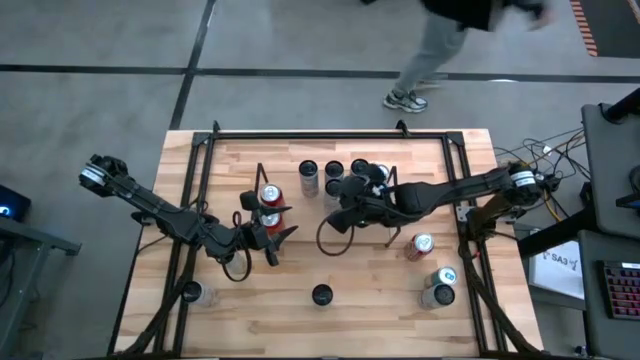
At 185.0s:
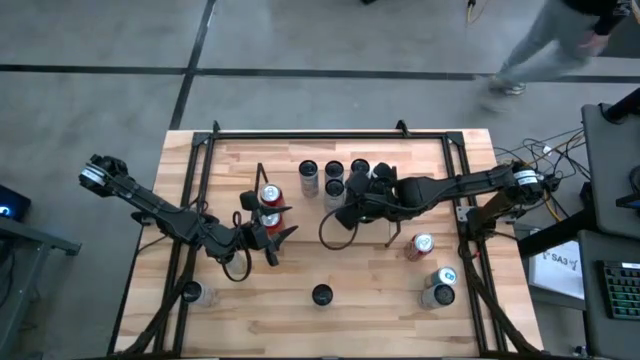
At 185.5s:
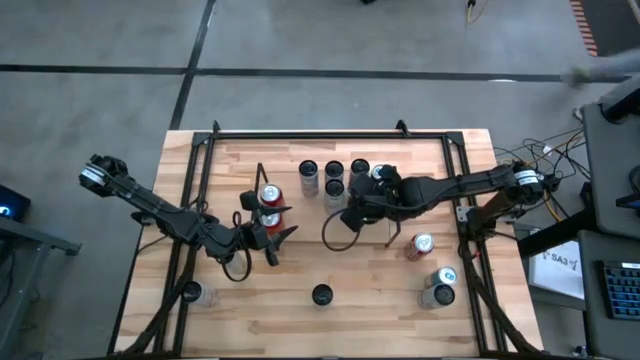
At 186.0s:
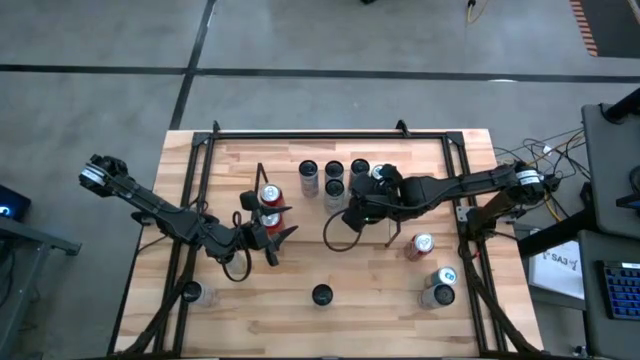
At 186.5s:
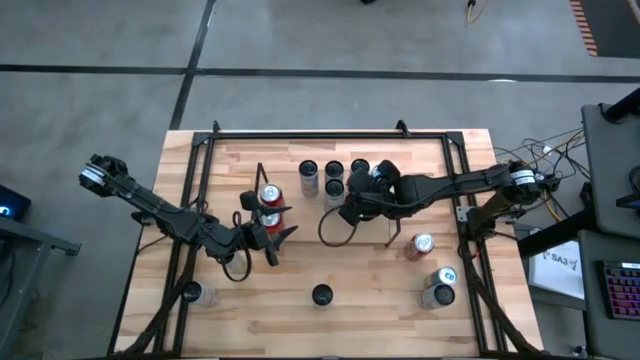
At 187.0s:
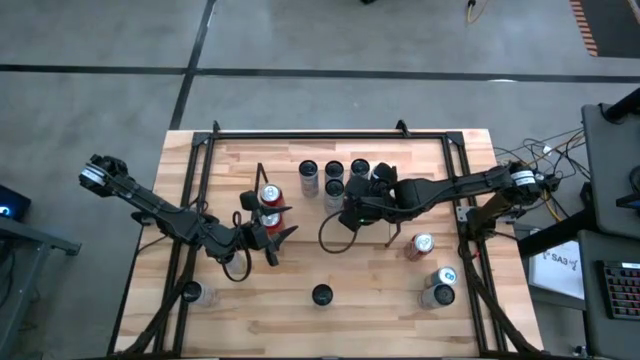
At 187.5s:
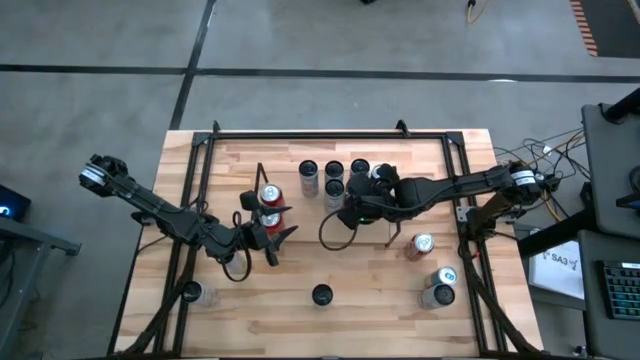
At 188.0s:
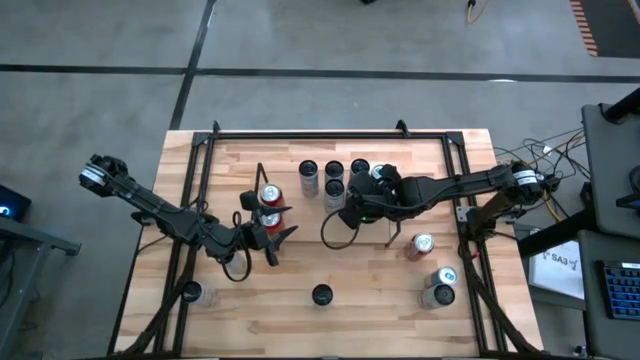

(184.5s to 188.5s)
Task: Place canned beverage on shelf
Adjust the white and yellow soda can

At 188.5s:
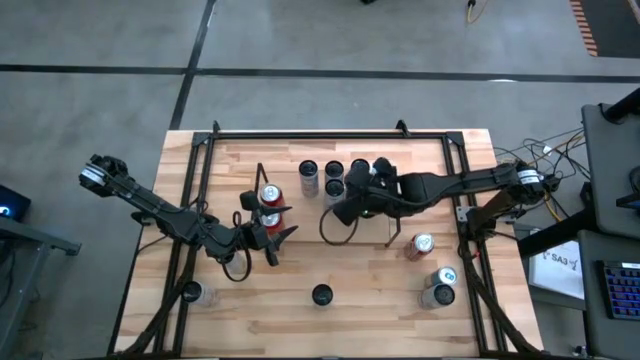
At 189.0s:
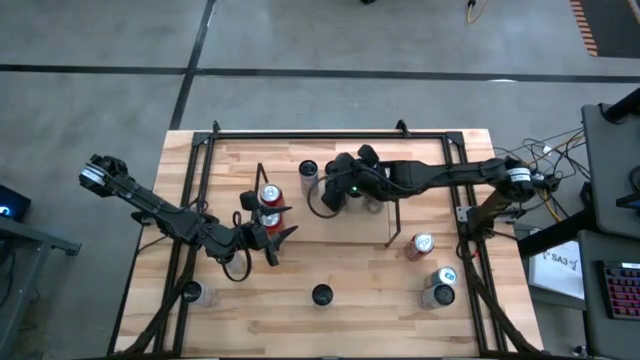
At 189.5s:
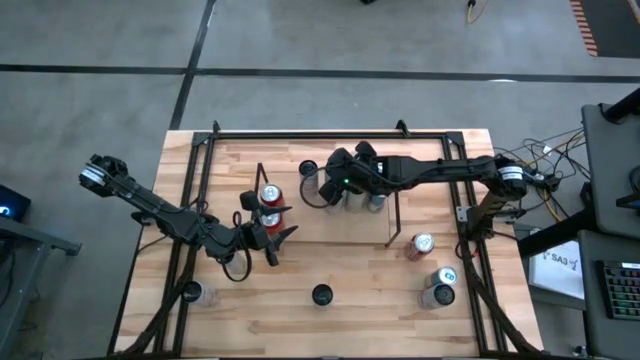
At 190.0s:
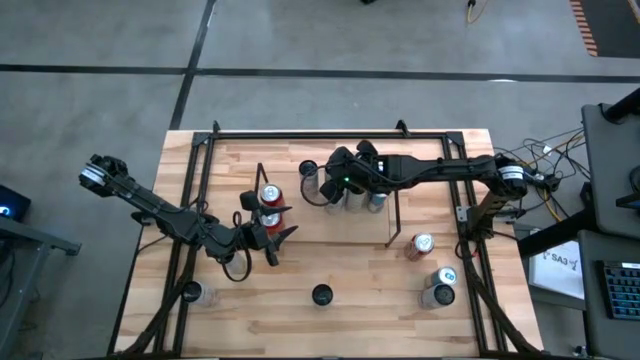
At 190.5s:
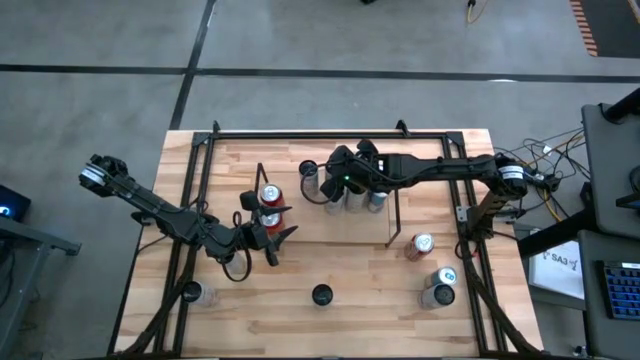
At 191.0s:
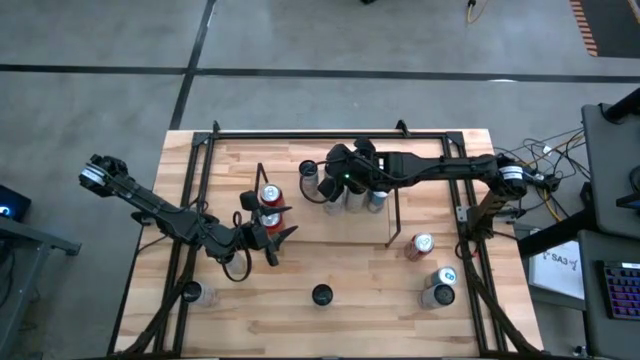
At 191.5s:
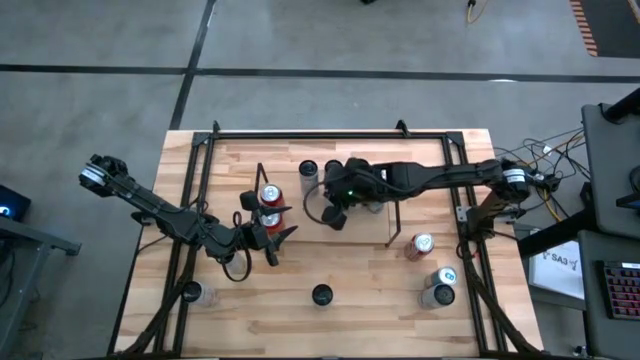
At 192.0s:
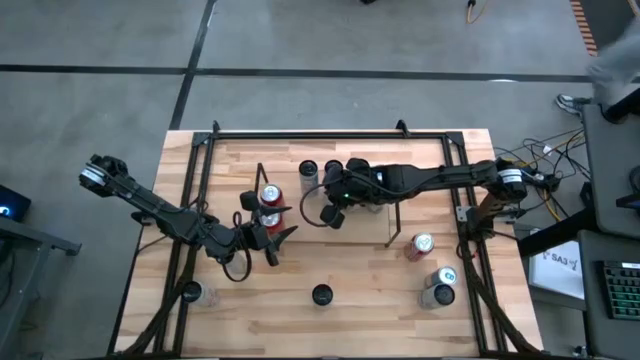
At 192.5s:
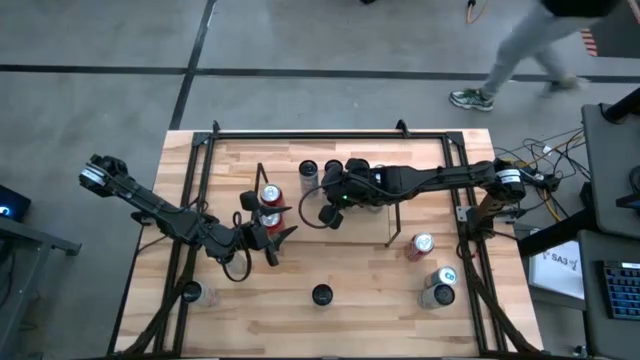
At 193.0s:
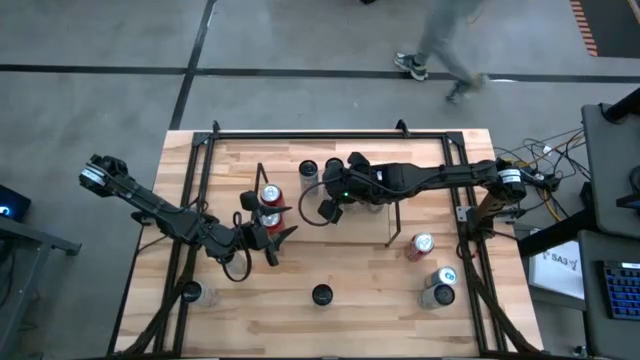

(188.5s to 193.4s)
Adjust the white and blue soda cans

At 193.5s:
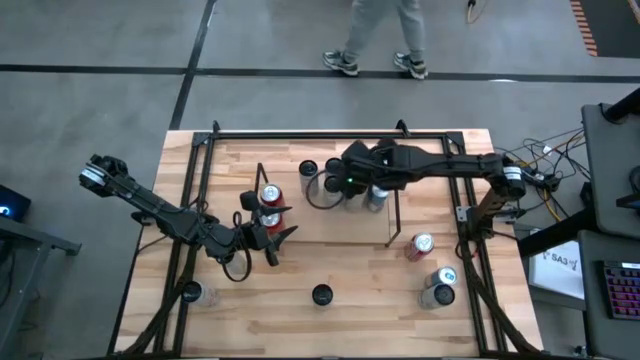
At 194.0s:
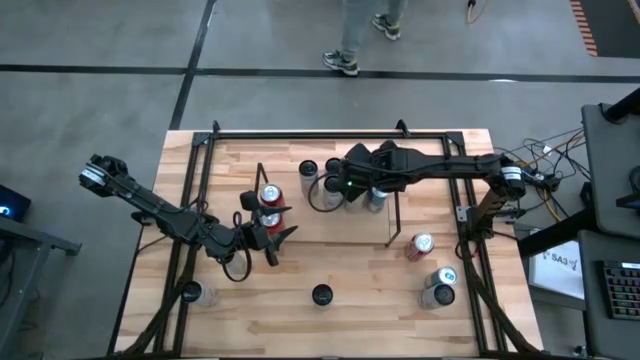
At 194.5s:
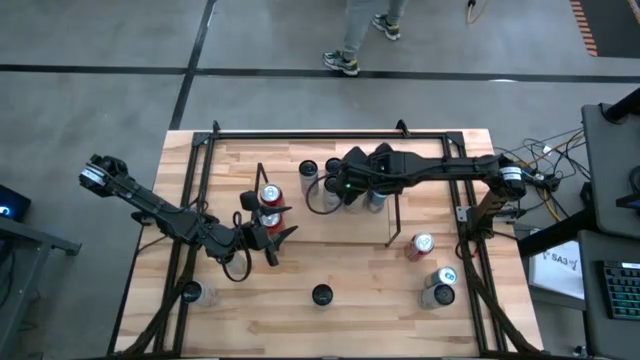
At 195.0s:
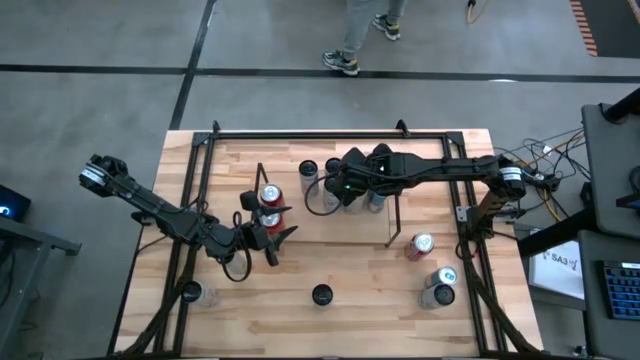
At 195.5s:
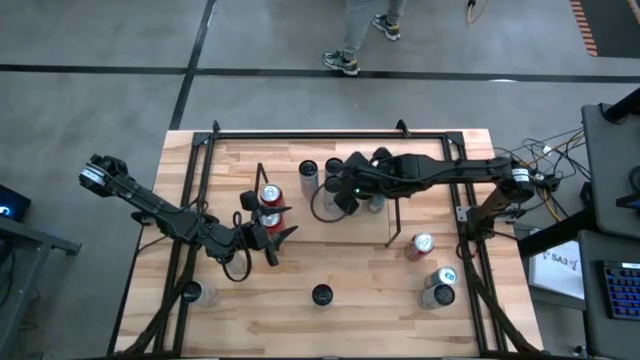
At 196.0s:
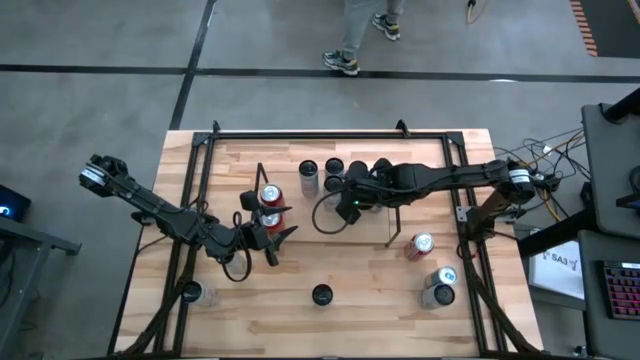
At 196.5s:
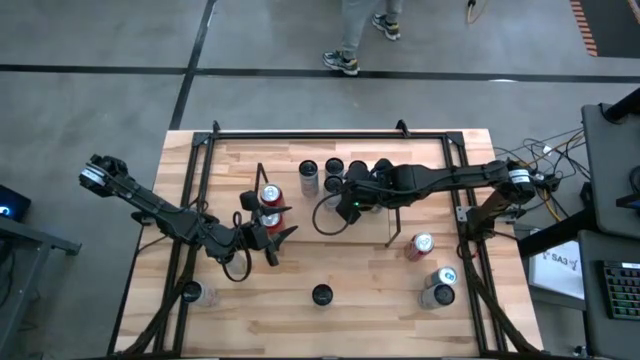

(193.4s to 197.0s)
Adjust the white and yellow soda cans

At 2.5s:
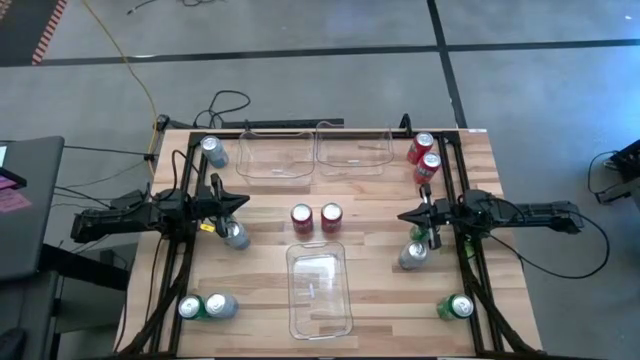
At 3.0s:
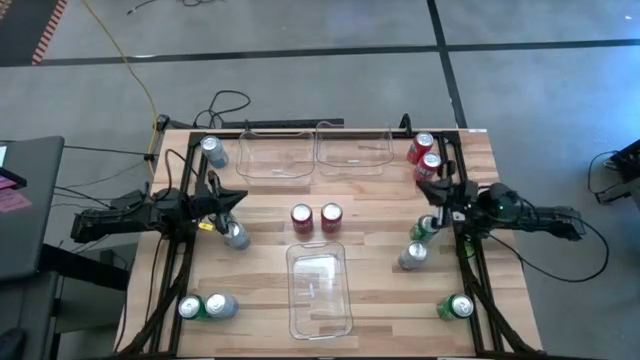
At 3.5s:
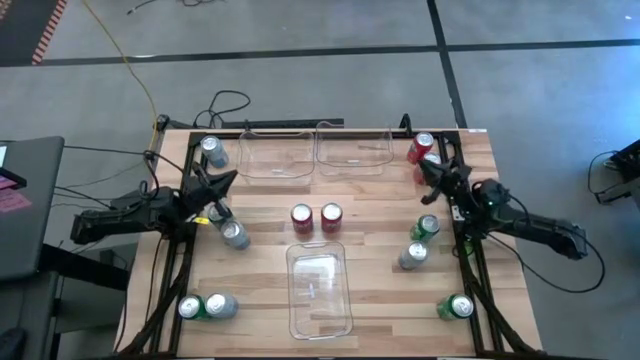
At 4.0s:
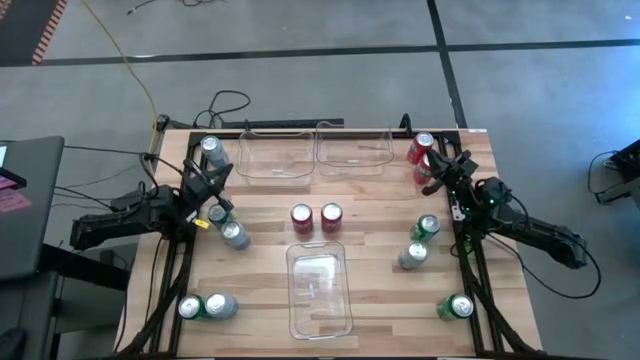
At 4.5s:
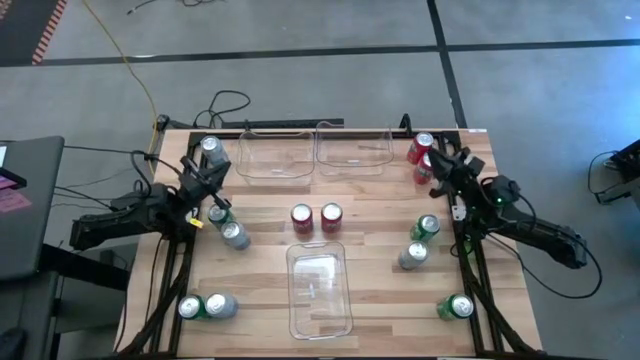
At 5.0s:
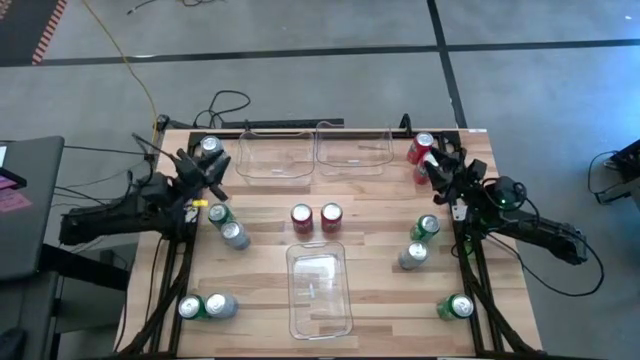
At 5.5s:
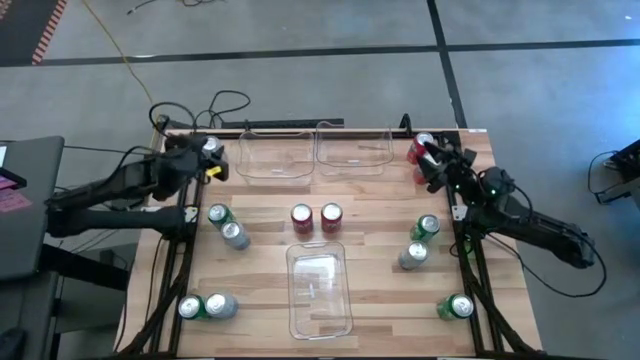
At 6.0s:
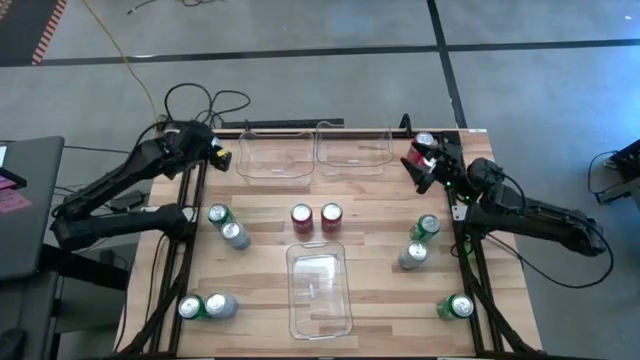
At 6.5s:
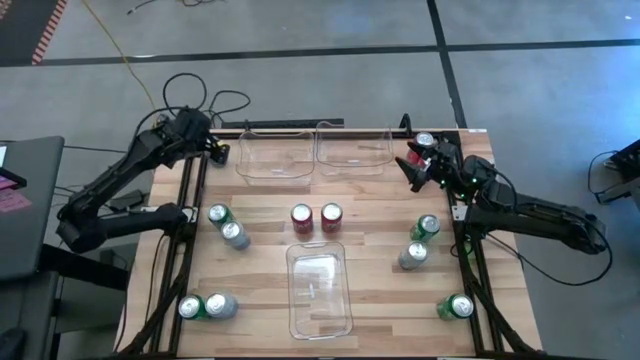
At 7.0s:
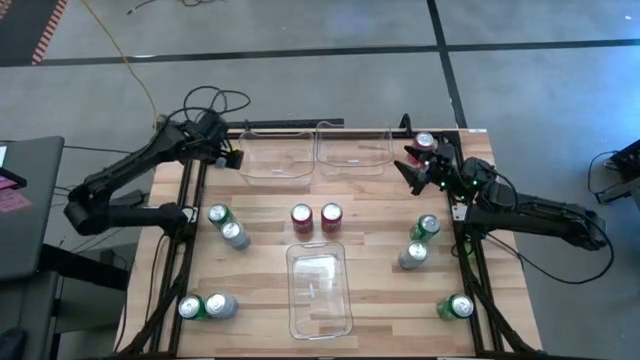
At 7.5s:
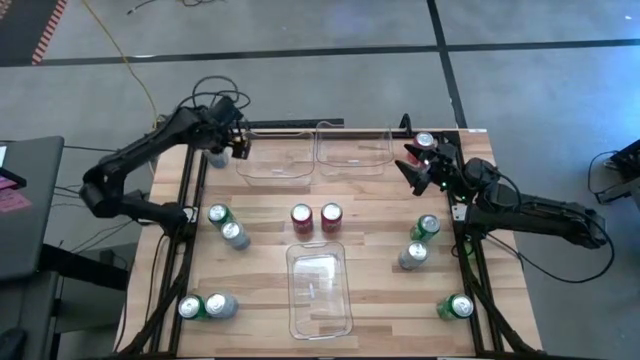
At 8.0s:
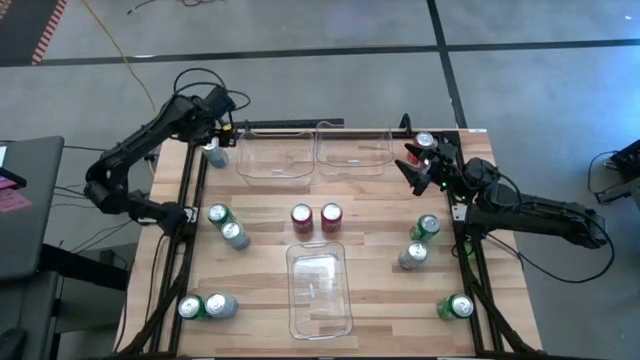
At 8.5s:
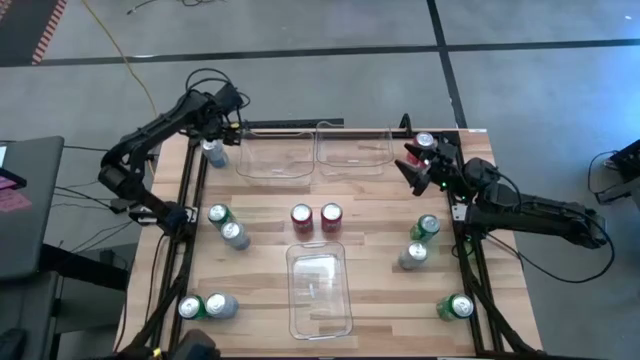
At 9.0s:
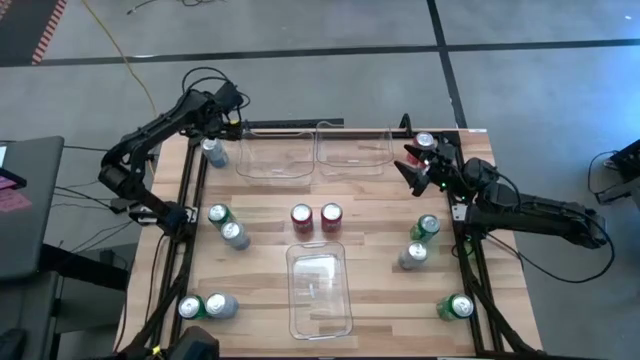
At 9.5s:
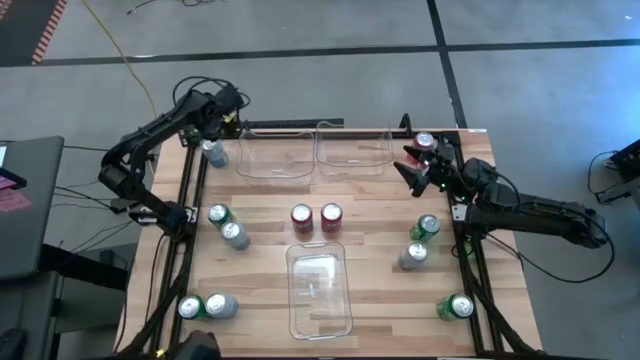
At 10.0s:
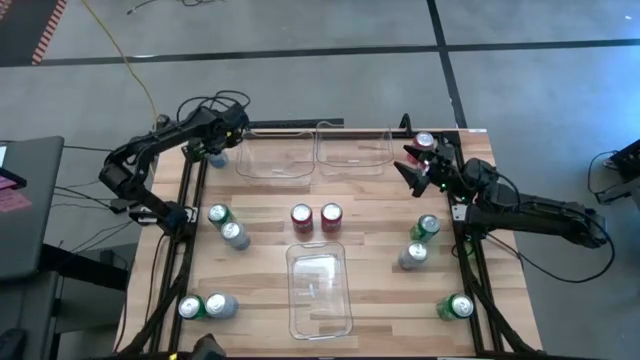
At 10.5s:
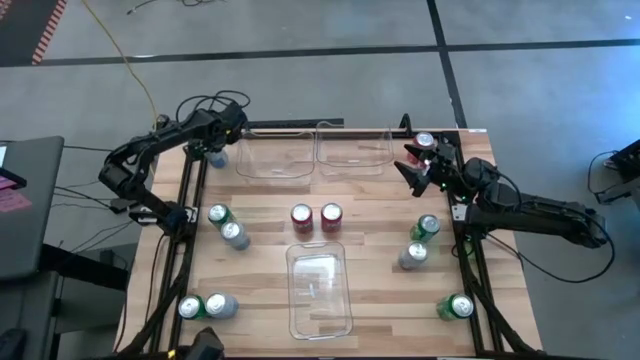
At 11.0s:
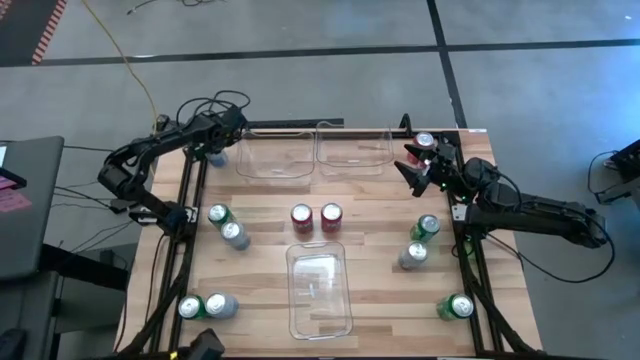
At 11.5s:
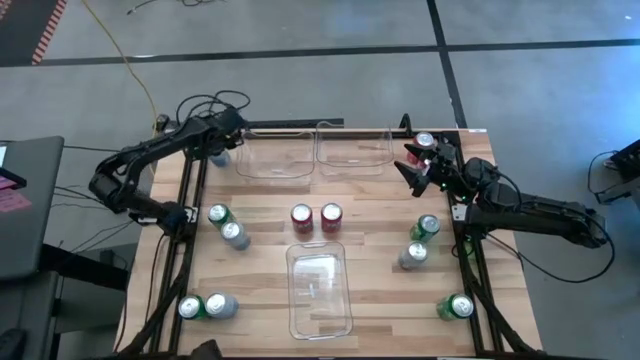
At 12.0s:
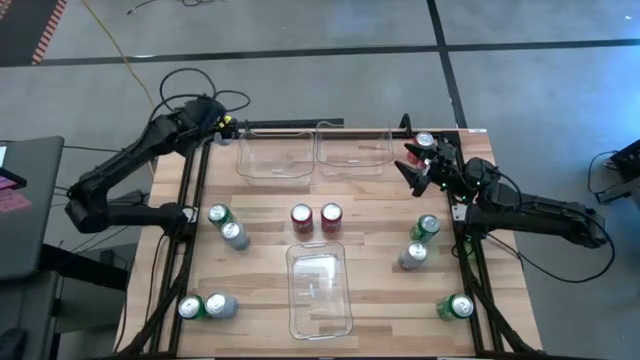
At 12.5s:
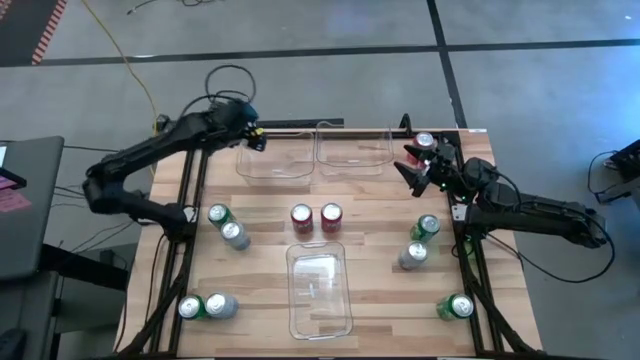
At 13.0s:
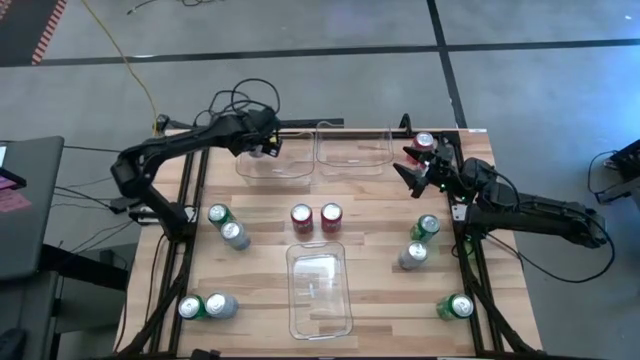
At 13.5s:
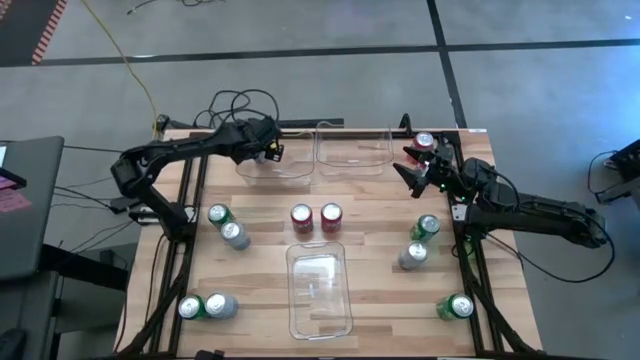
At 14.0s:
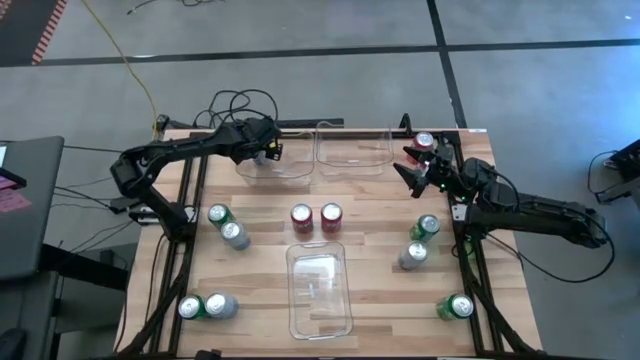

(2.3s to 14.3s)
Task: Sort soda cans
Put the top left white and blue soda can into the top left transparent bin
